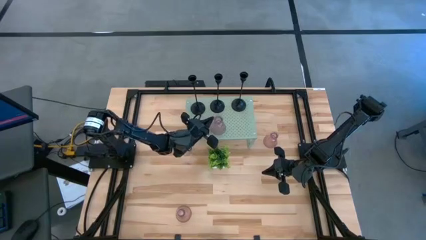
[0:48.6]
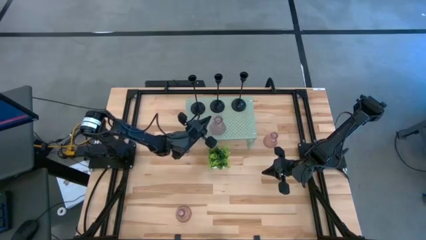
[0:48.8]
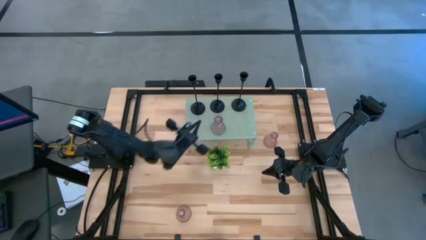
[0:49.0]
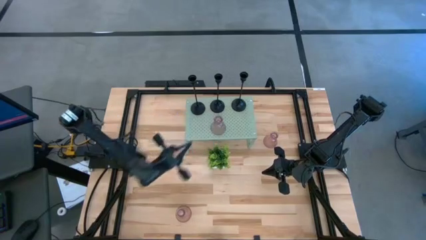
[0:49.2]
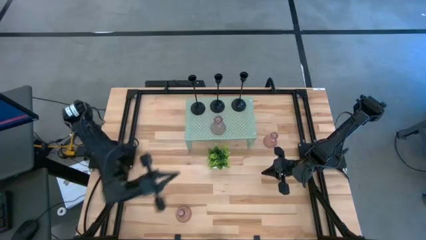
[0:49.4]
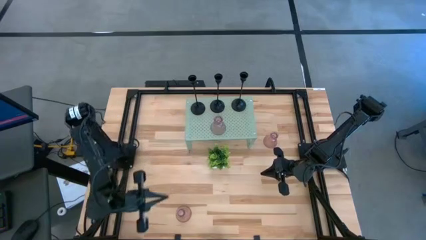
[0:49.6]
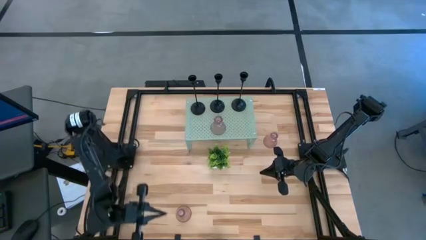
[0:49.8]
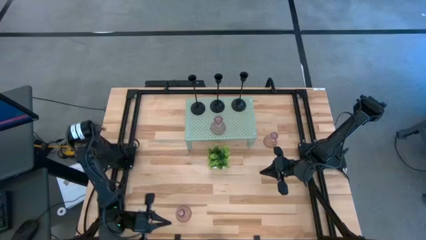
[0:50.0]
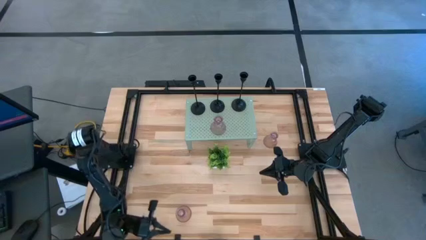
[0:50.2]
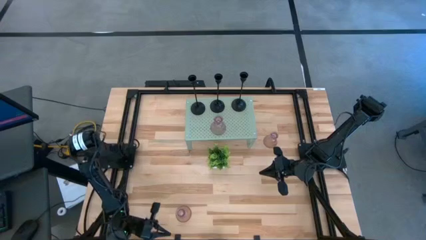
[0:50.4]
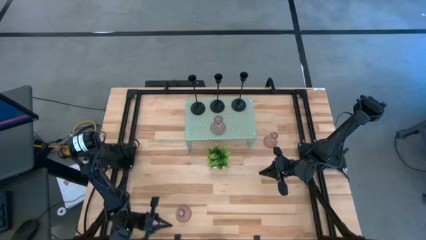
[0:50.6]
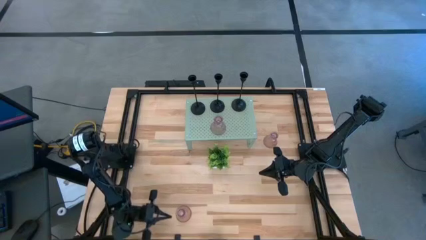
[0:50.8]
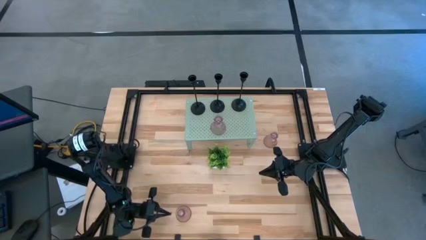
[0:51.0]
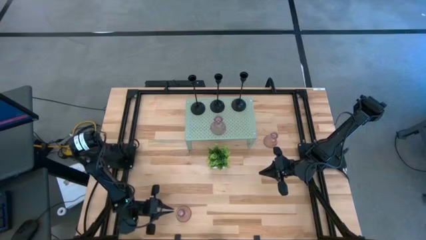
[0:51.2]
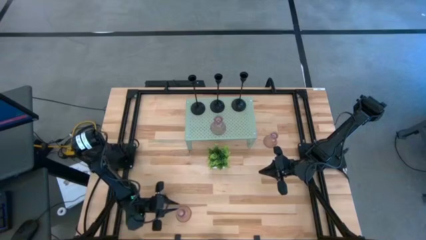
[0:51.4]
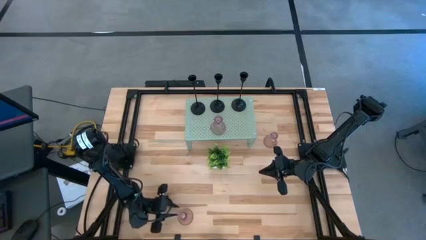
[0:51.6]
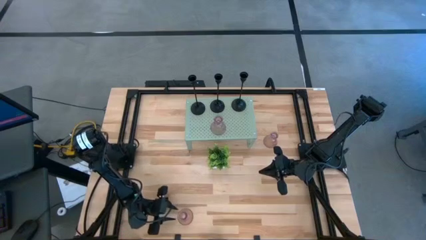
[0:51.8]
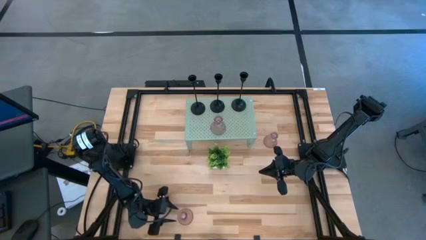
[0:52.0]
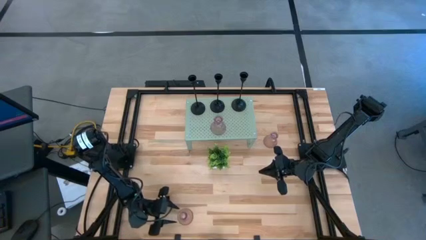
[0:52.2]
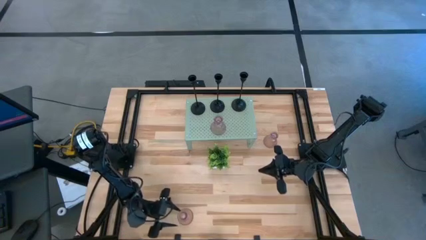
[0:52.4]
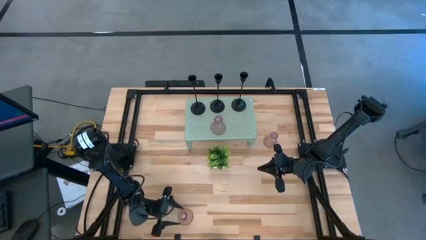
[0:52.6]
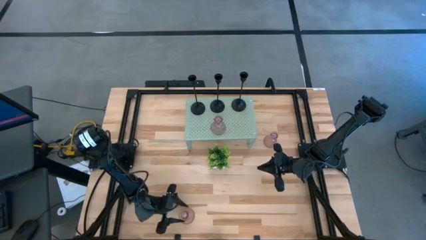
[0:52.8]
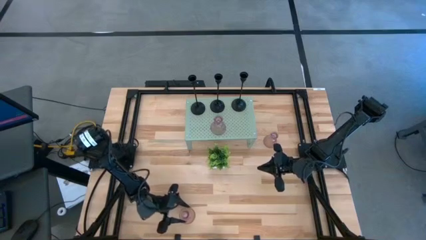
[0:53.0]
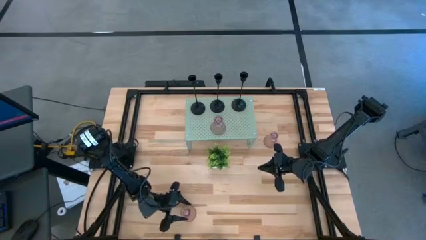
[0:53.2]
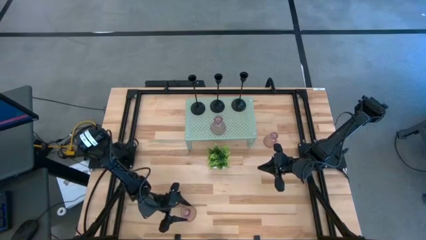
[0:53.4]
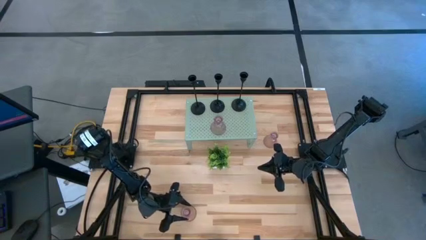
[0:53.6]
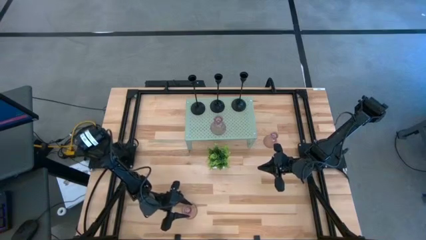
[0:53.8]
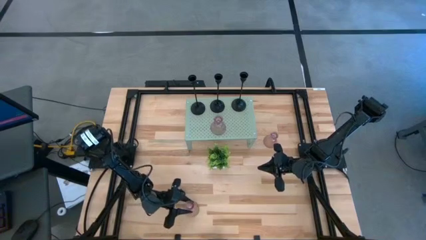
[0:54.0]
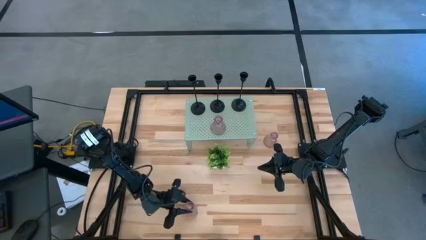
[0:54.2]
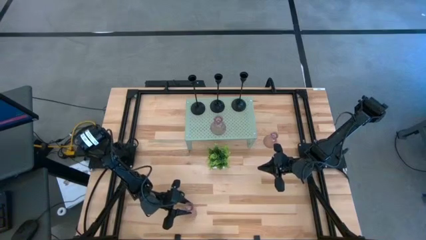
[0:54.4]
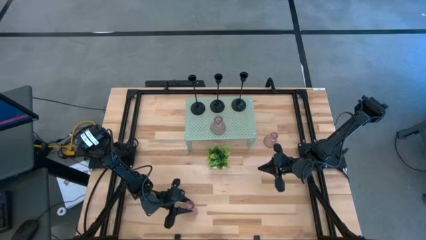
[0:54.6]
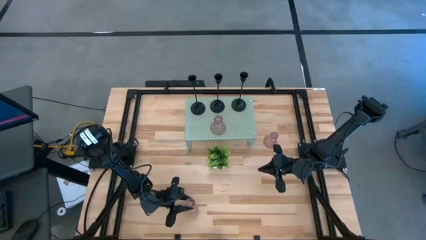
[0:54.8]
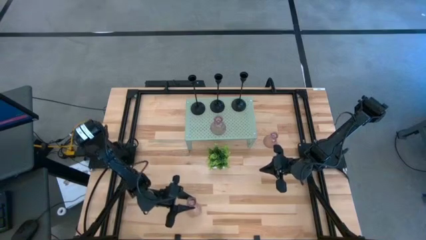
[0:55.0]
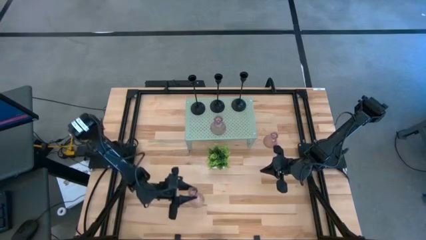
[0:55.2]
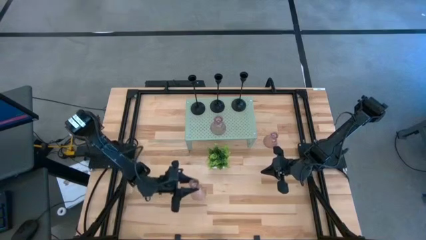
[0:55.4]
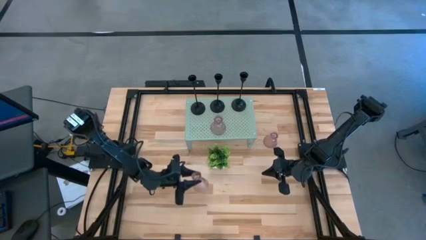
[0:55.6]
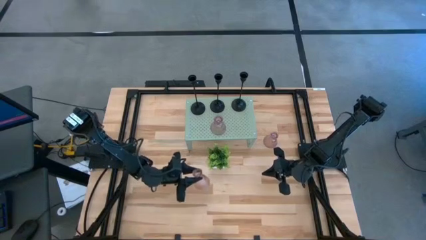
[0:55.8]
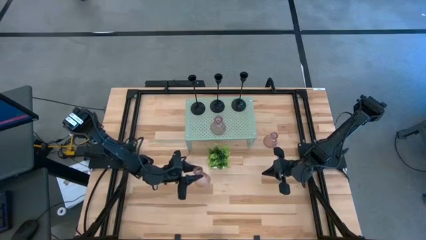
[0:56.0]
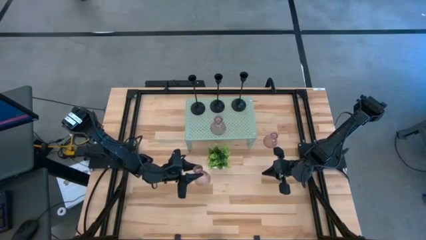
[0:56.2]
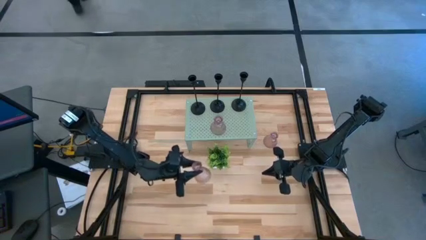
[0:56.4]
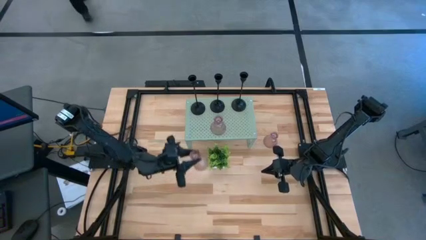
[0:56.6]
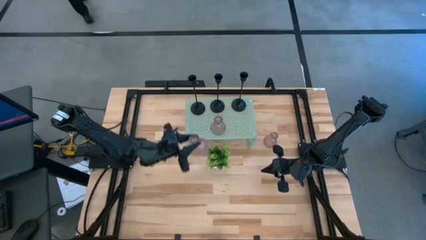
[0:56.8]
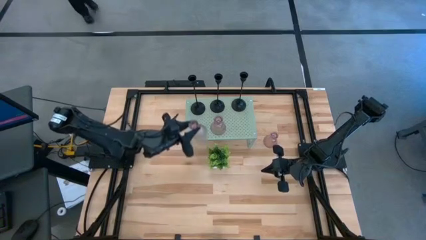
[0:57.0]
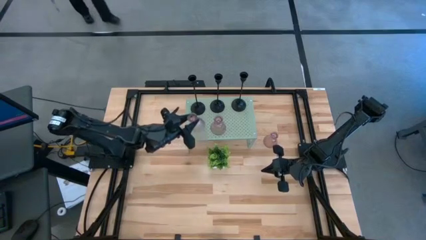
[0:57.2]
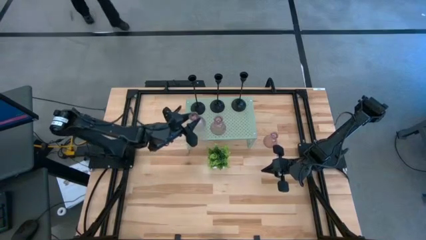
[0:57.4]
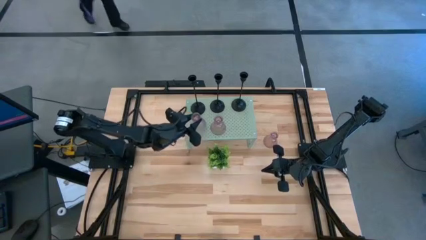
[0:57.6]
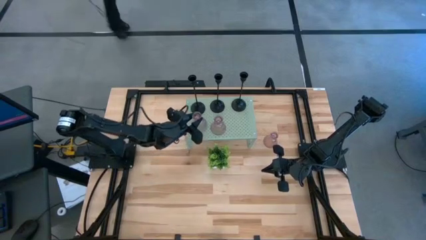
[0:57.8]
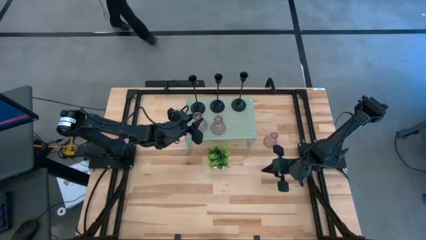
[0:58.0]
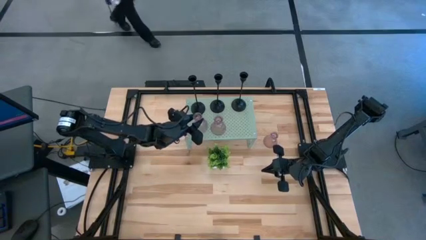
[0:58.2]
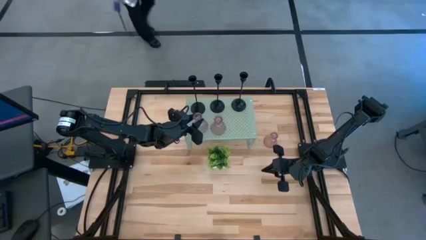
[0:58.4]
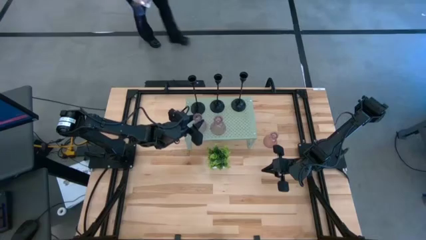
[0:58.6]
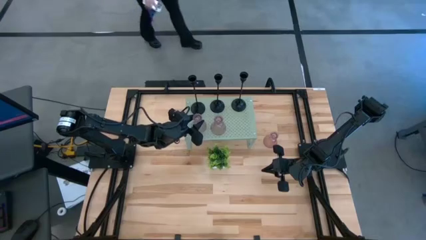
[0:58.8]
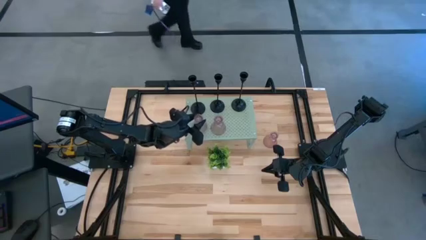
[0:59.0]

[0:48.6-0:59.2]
Task: Pick & Place candle stick holders
Put the bottom pink glass candle holder on the shelf

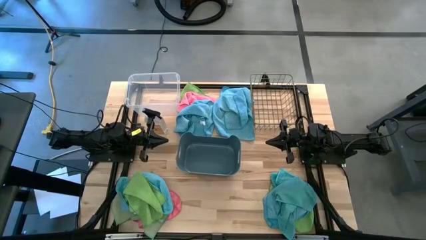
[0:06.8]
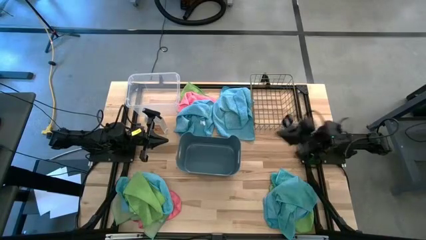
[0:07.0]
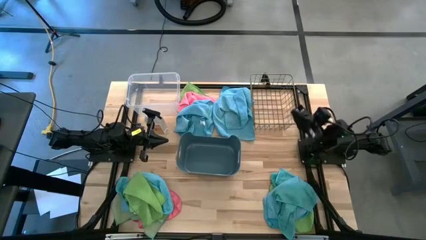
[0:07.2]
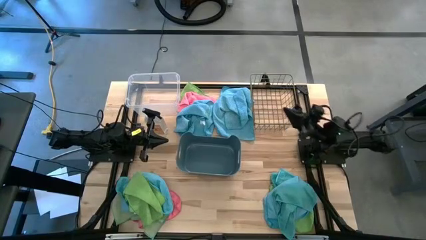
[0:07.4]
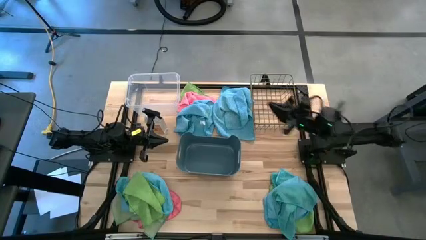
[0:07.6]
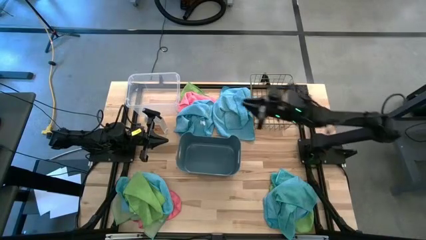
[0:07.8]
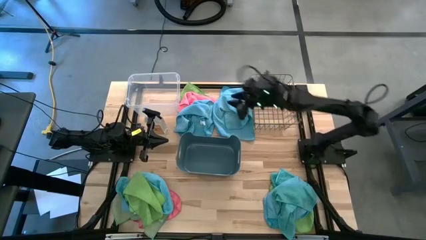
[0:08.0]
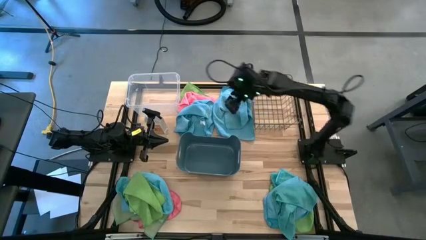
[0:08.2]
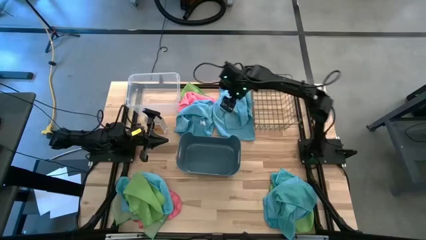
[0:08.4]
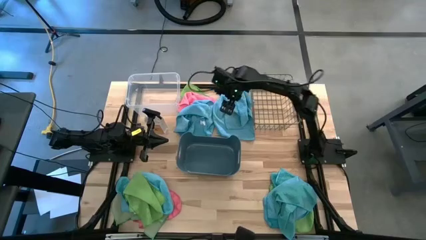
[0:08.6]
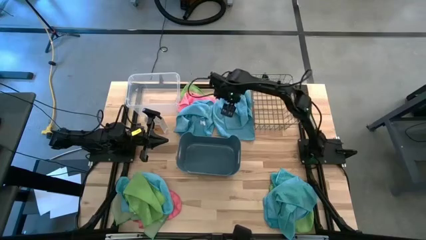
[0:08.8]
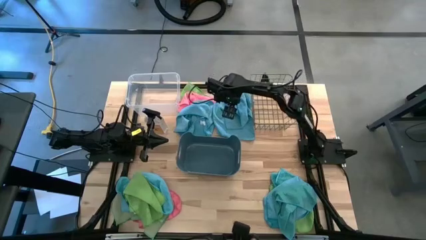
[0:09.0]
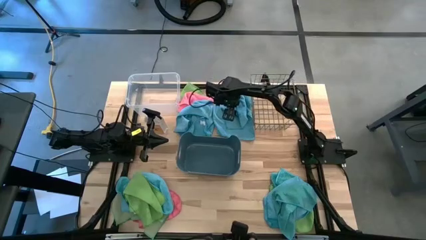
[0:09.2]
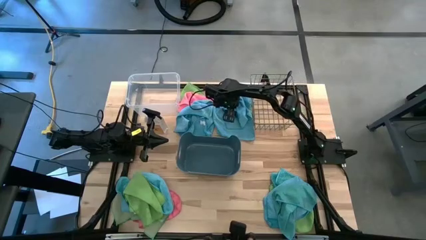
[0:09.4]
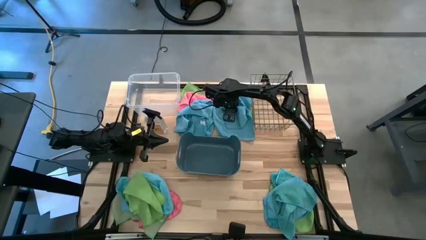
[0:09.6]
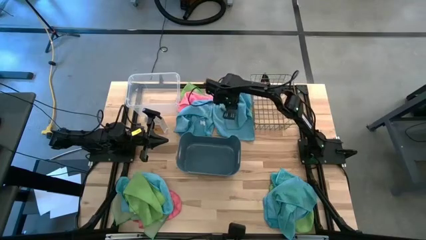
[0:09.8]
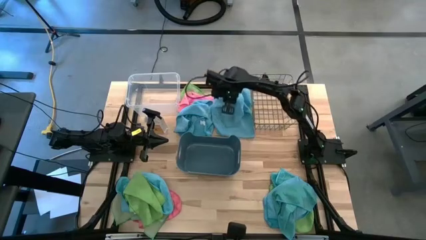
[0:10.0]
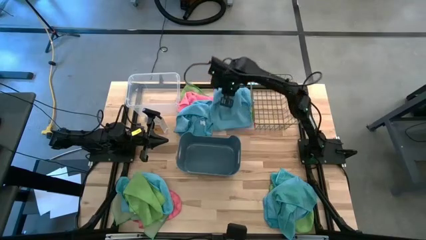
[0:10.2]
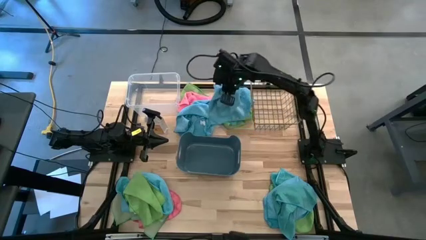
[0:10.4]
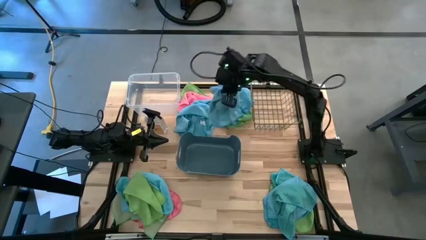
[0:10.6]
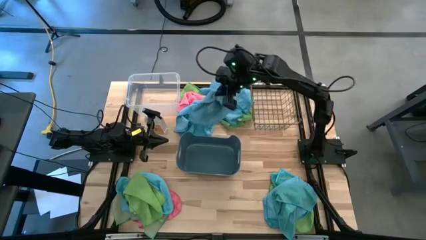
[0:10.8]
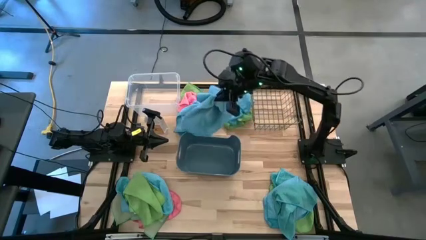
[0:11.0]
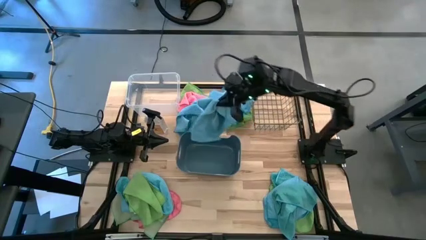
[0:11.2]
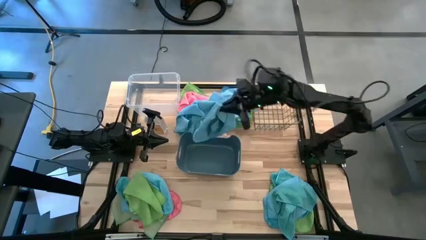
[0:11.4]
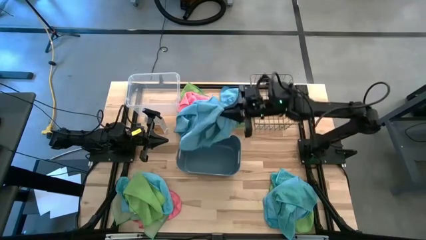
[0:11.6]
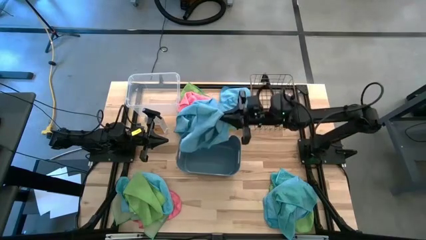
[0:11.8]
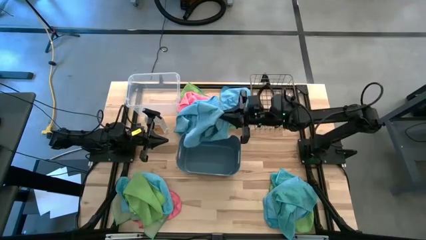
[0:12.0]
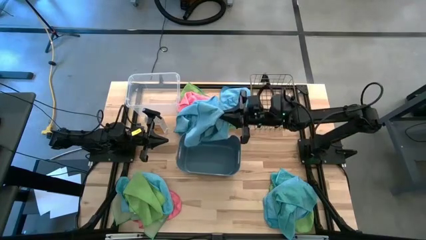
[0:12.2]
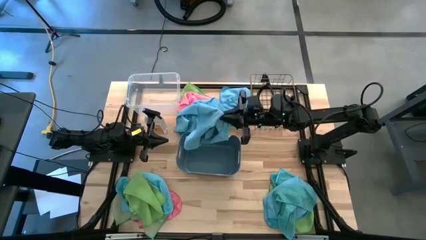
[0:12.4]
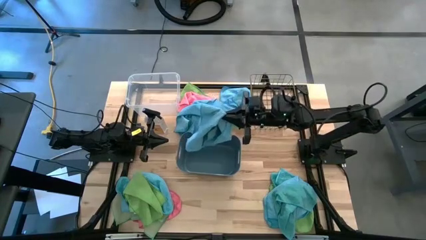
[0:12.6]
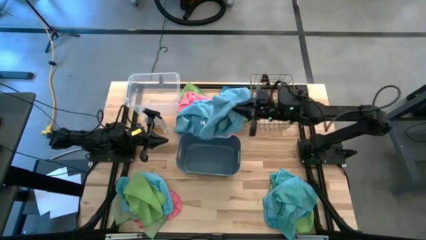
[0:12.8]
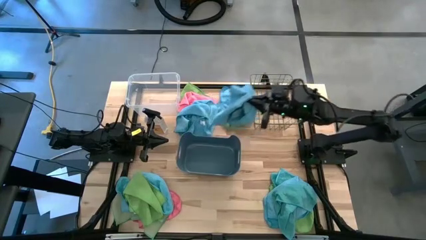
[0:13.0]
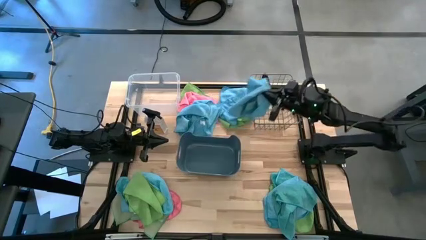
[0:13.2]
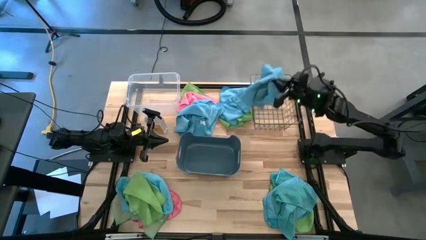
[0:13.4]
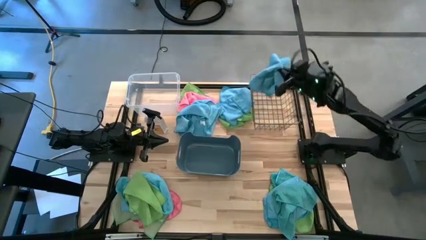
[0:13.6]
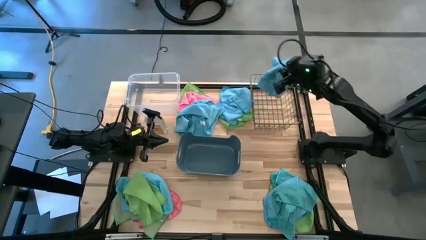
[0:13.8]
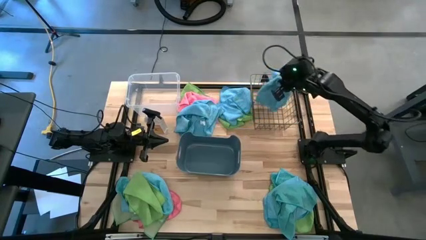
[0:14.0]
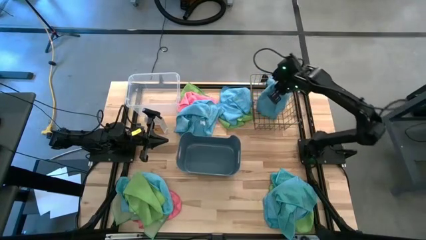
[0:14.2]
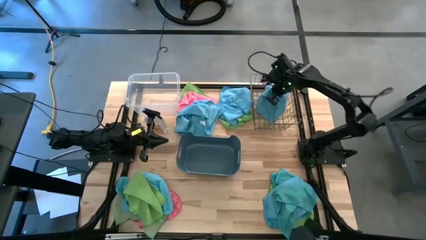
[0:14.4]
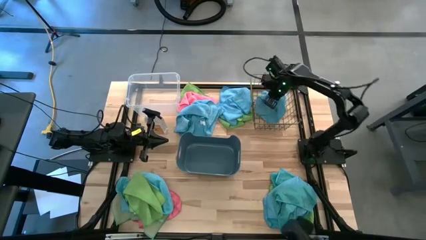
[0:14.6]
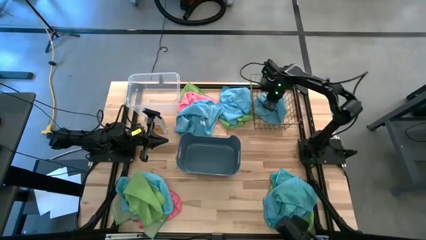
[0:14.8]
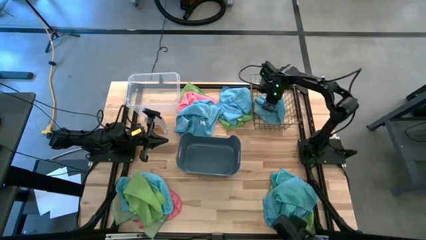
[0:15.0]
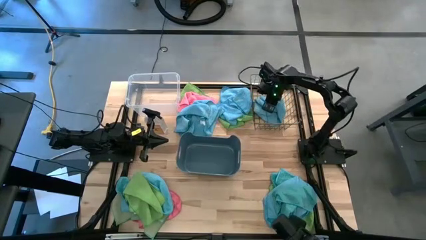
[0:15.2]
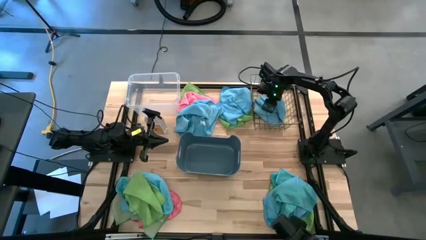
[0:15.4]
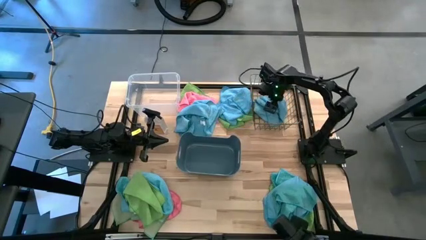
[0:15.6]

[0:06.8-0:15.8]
Task: Sort microfiber towel by color & place in baskets
Put the blue microfiber cloth into the gold wire basket
